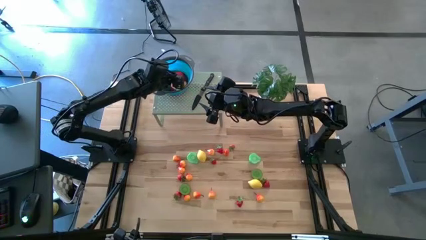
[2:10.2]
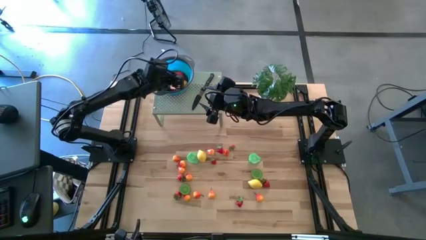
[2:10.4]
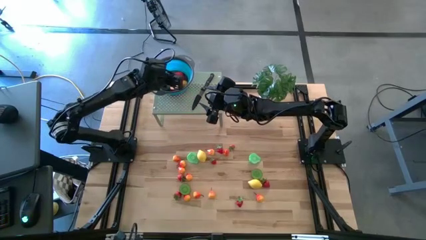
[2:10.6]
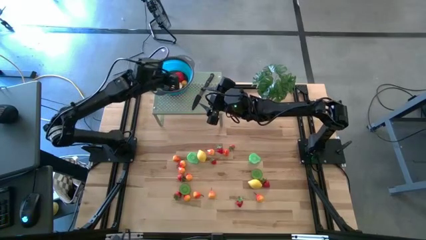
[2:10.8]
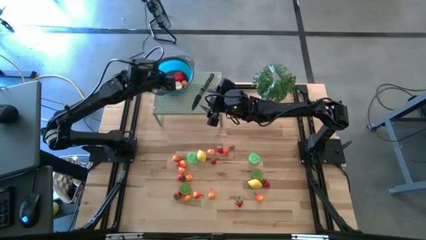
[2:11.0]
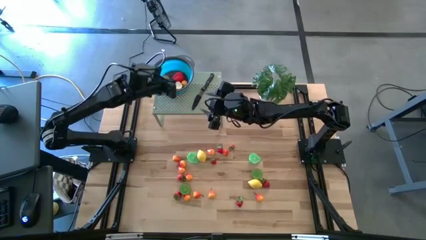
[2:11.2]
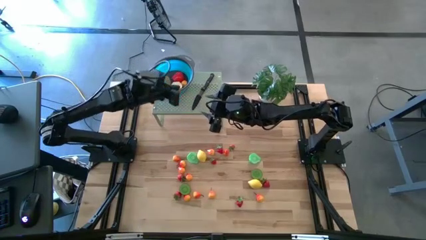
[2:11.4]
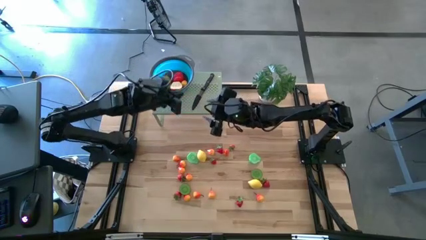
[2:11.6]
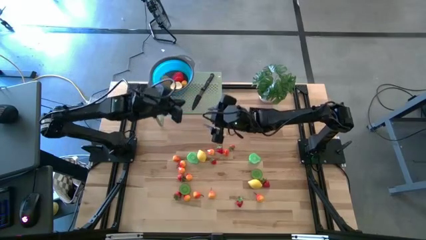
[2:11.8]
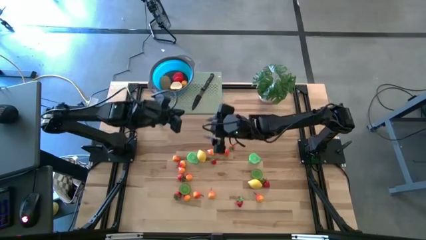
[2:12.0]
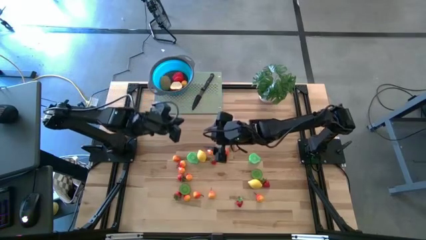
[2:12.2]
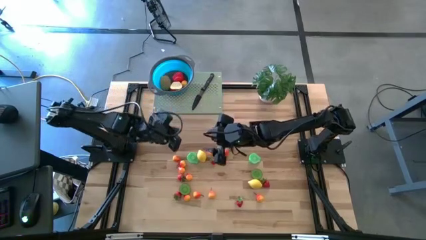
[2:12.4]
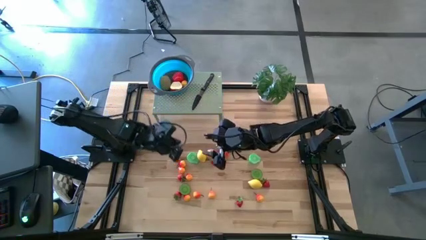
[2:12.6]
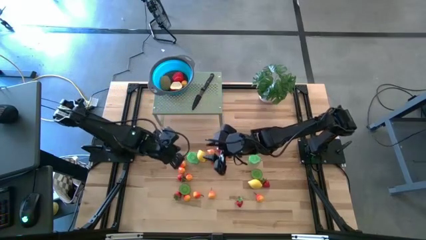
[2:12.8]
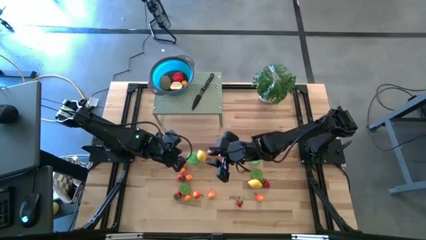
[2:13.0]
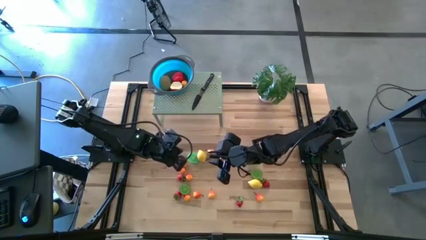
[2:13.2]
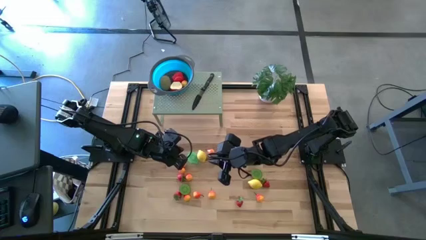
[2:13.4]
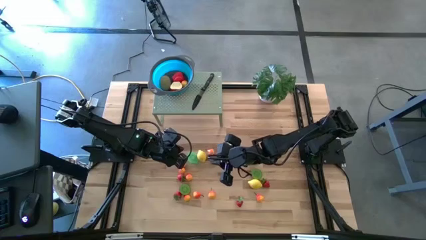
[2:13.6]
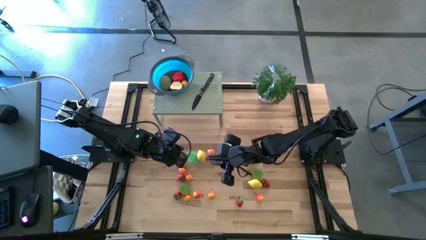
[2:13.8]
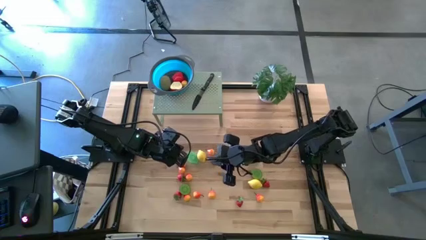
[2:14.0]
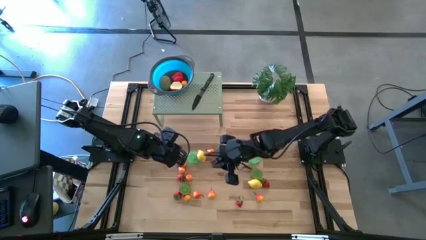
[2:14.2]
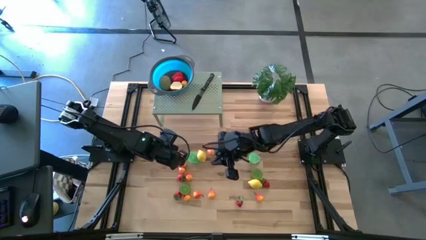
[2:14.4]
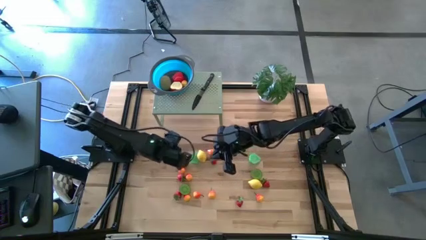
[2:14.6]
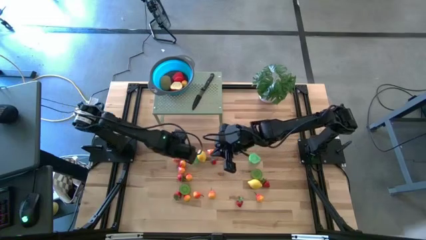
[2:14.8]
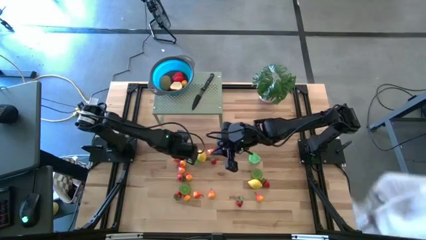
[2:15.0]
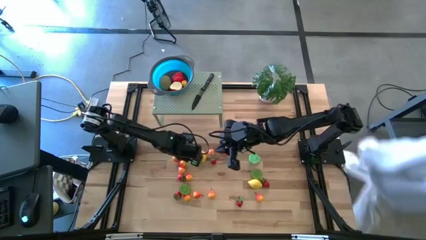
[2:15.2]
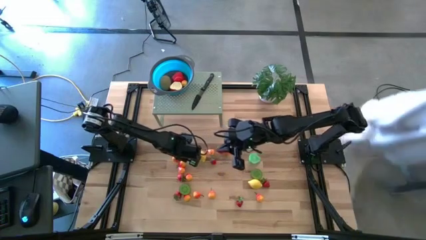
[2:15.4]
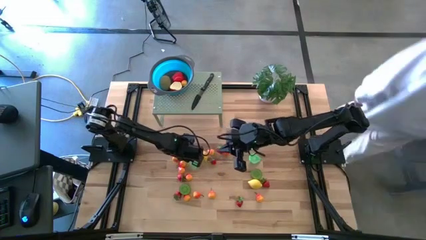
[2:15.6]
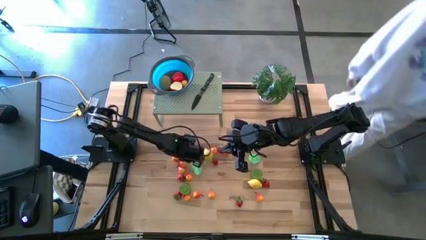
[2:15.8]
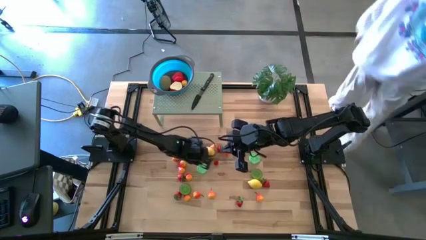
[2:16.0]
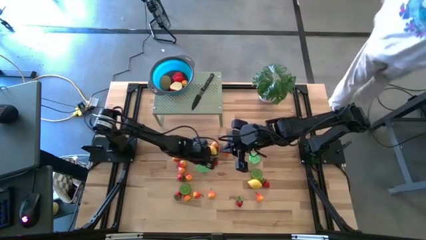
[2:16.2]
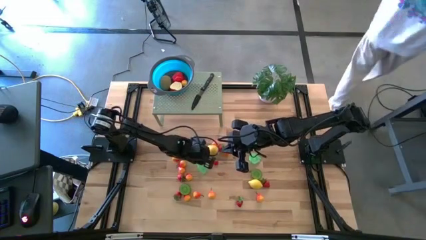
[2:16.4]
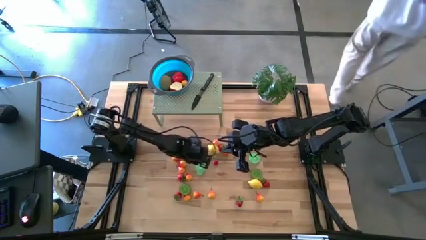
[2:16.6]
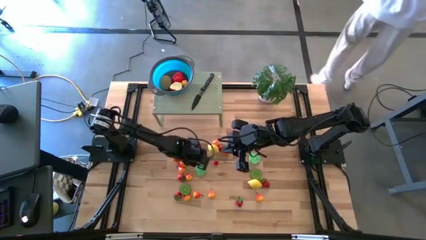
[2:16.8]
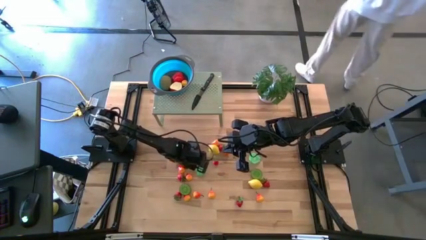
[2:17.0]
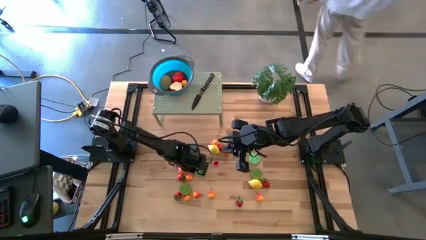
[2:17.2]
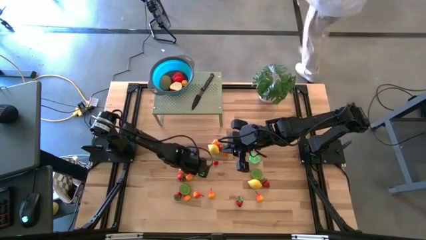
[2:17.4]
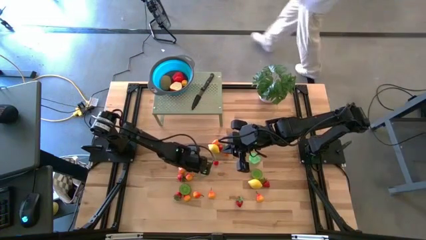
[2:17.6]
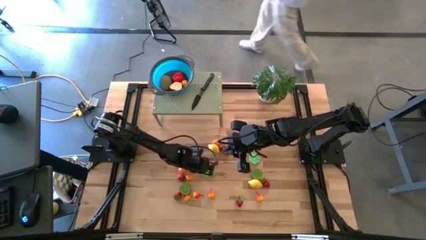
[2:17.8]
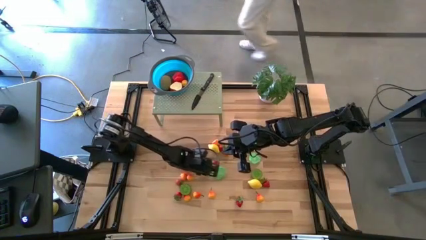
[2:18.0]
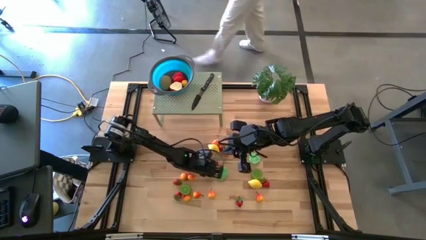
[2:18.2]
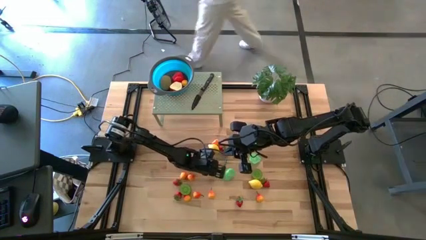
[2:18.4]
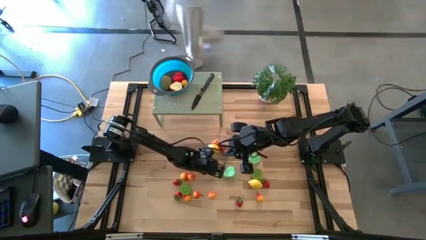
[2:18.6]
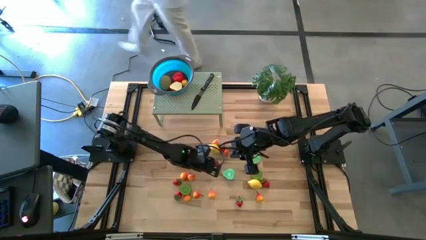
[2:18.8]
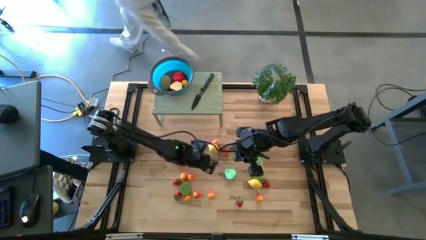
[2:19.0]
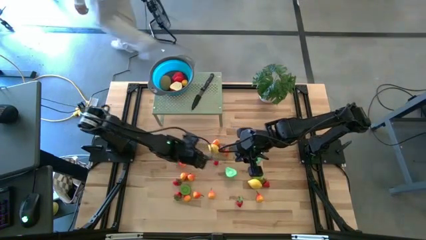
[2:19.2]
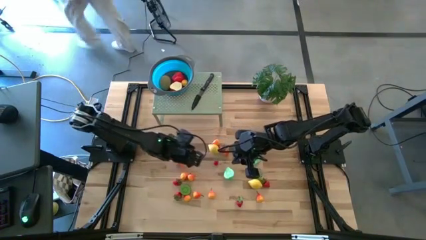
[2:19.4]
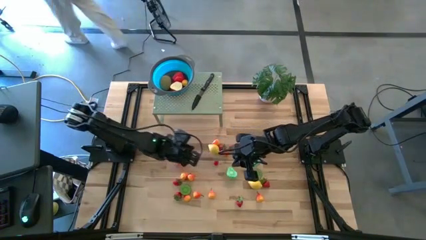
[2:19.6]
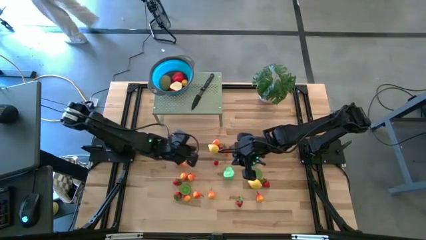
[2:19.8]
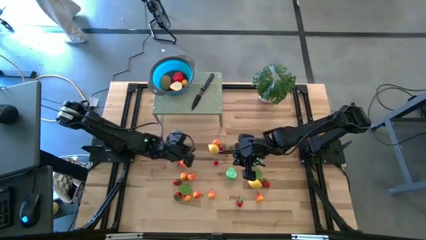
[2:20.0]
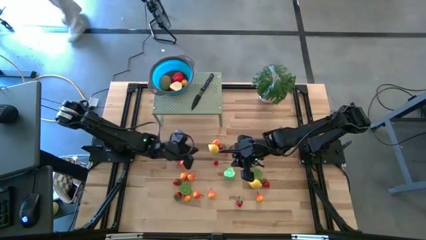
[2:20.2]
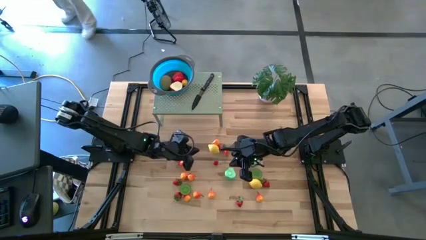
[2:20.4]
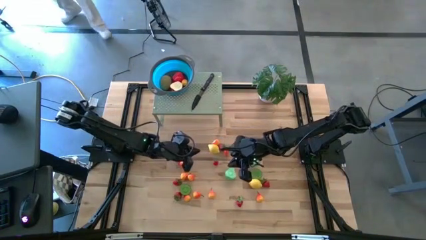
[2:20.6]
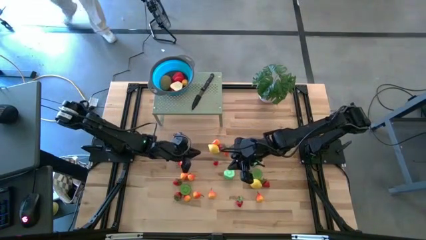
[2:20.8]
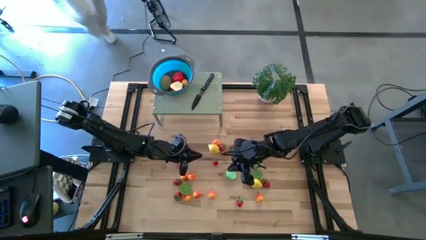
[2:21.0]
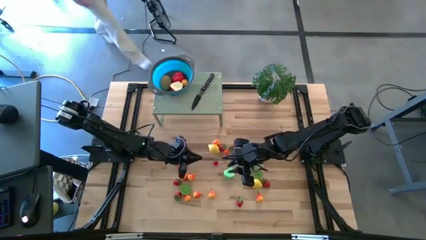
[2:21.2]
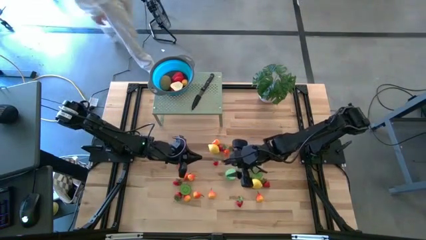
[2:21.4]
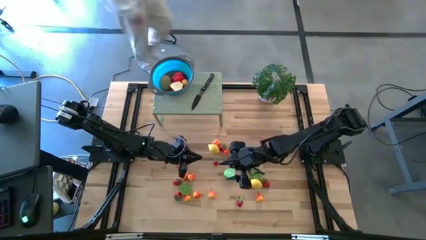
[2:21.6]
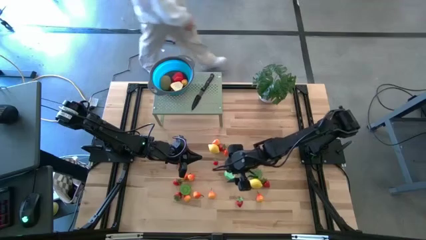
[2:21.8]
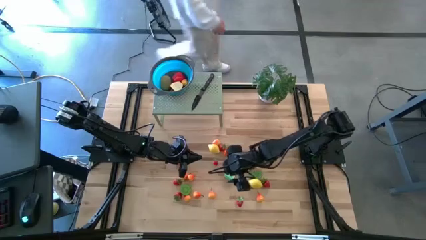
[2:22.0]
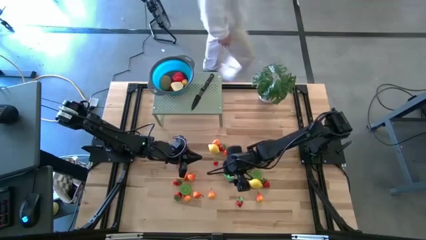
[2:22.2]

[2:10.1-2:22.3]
Task: Pick & Place Fruit
Put the half green pear into the strainer bowl on the shelf

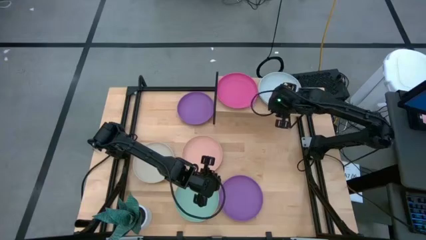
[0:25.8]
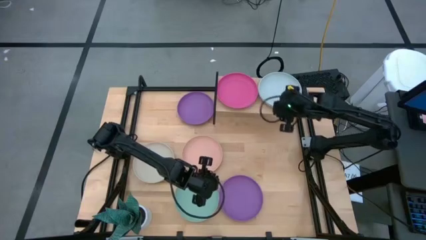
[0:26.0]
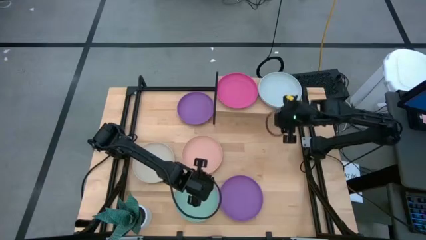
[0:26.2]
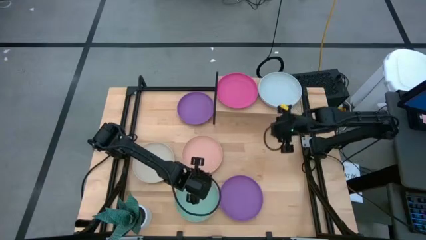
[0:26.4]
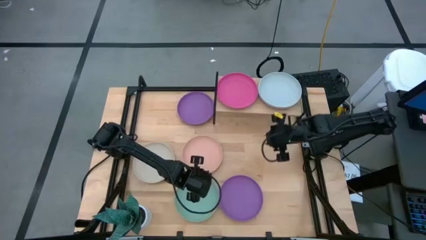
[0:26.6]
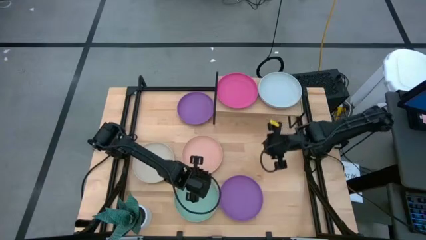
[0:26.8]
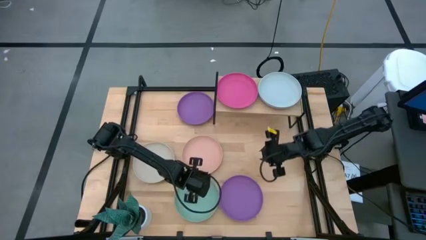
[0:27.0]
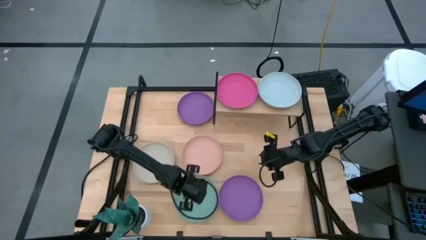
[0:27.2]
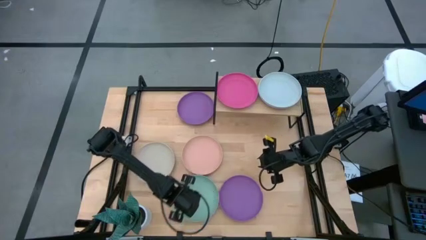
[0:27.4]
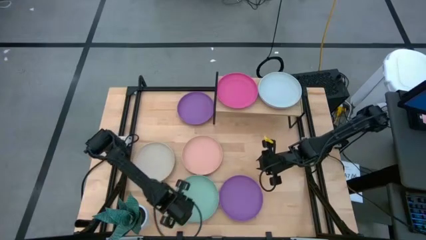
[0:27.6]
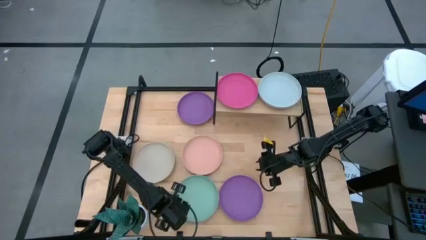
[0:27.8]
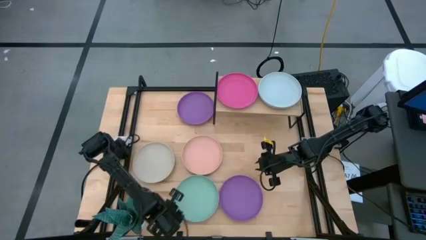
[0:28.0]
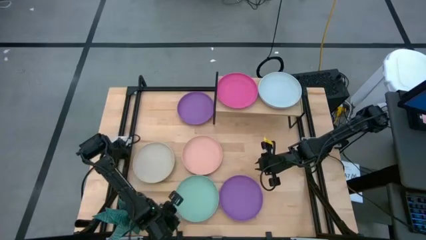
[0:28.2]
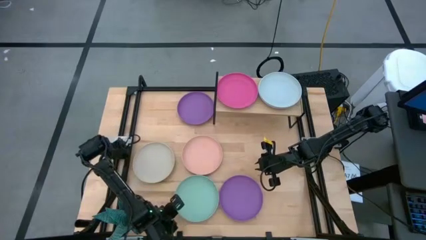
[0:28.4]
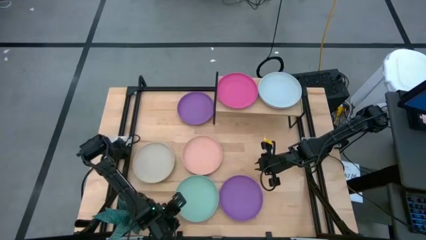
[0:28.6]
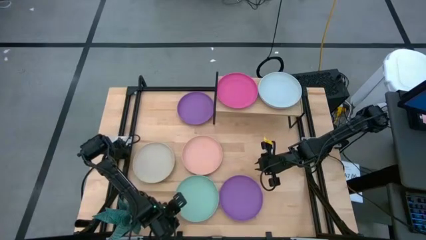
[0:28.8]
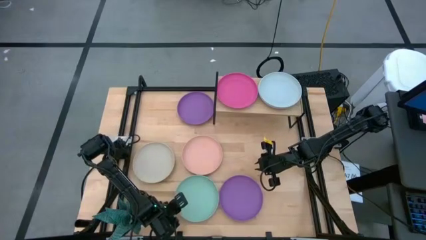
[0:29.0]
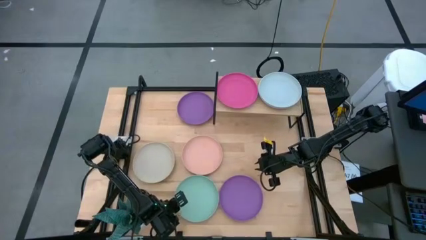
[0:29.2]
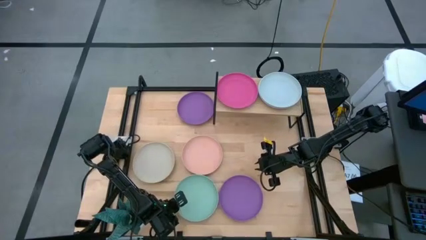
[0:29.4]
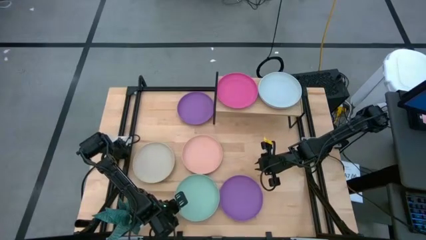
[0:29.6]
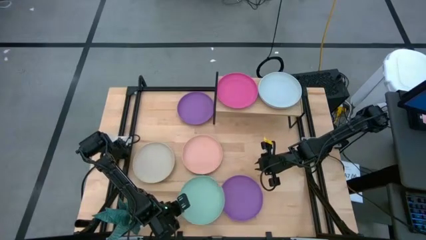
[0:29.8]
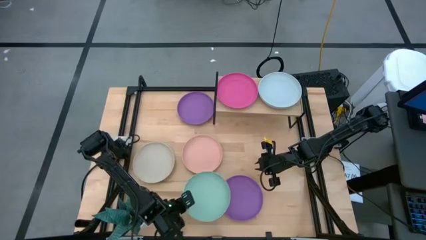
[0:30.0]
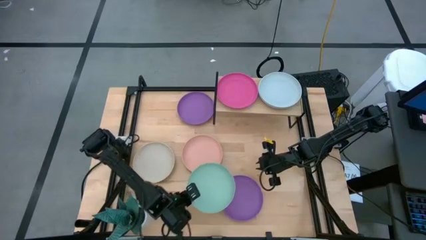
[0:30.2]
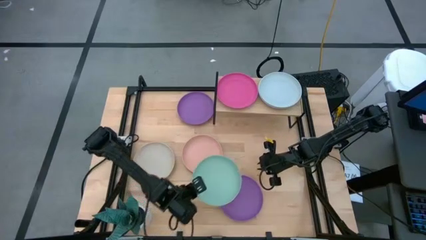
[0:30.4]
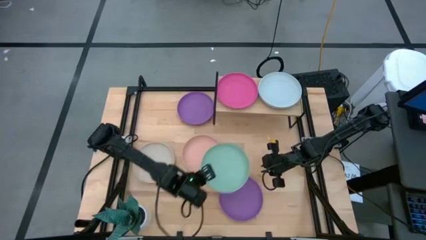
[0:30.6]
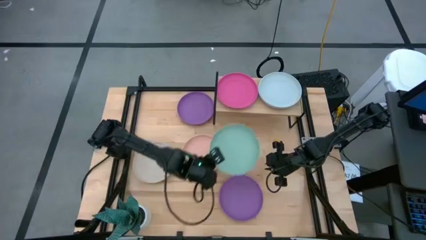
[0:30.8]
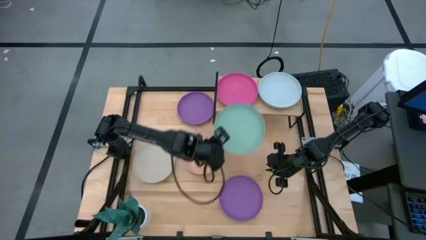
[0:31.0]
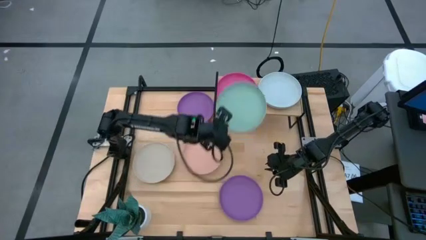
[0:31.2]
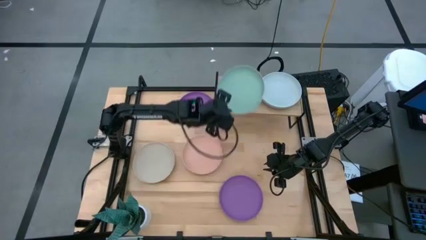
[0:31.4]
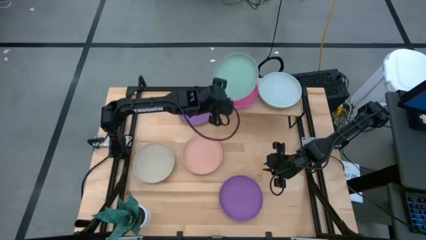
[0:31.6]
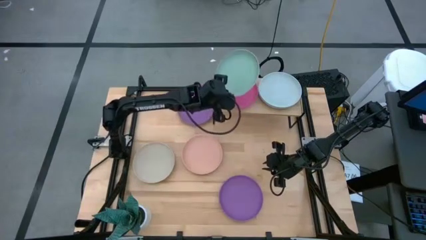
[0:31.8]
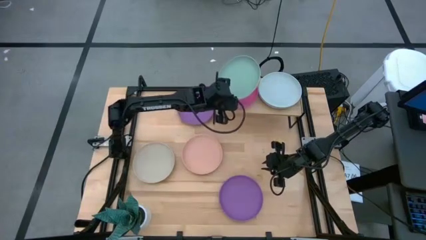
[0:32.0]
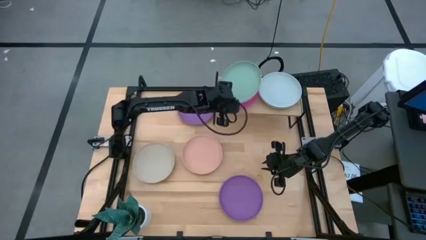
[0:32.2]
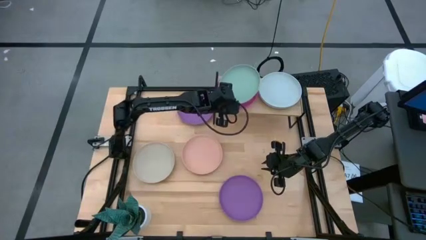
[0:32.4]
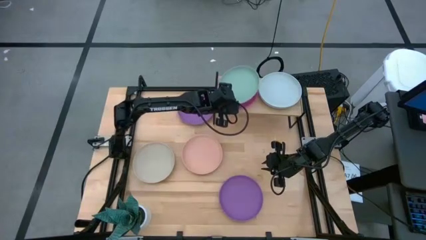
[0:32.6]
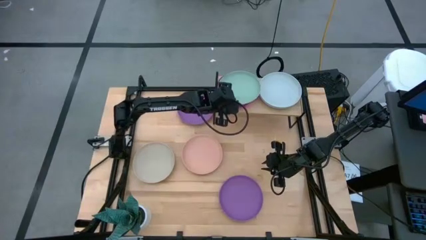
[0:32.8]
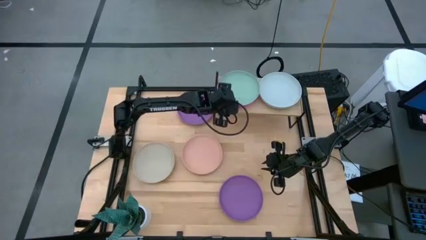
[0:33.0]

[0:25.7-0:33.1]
Task: Place and stack plates onto a shelf
Stack the green plate on top of the pink plate on the shelf
